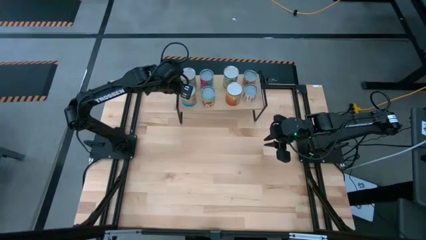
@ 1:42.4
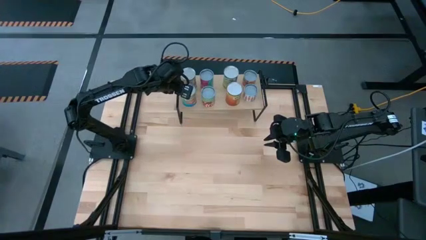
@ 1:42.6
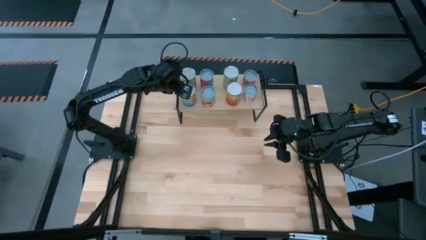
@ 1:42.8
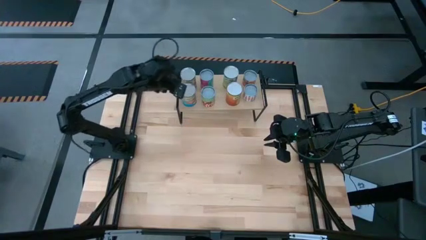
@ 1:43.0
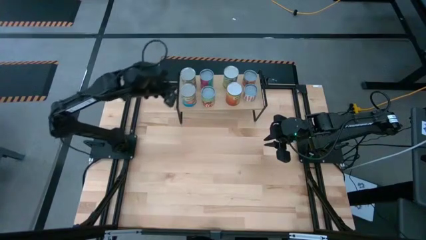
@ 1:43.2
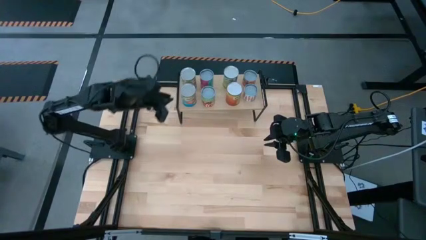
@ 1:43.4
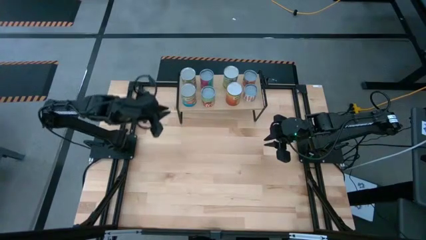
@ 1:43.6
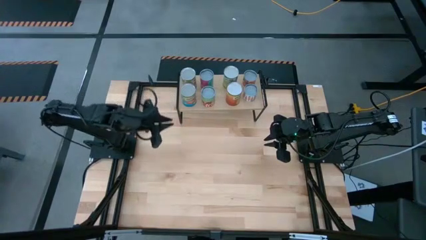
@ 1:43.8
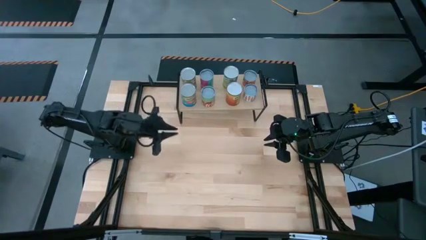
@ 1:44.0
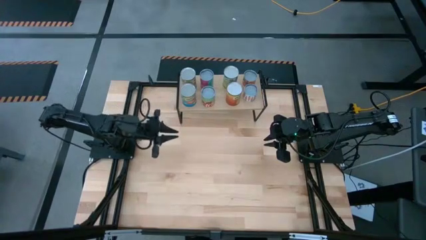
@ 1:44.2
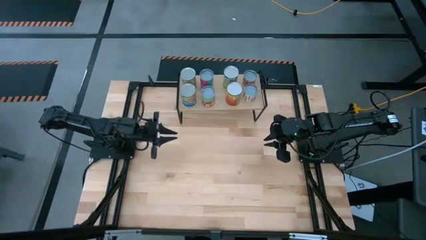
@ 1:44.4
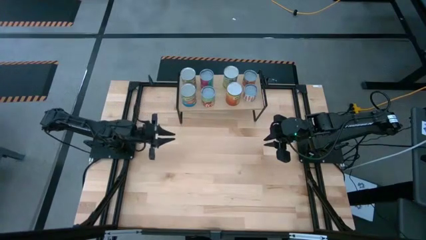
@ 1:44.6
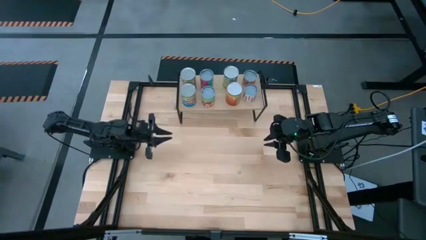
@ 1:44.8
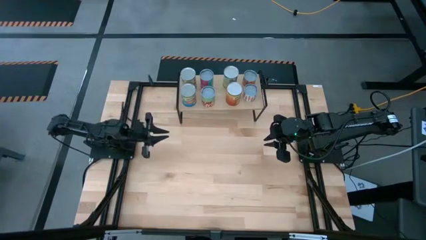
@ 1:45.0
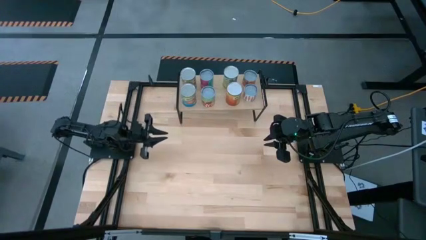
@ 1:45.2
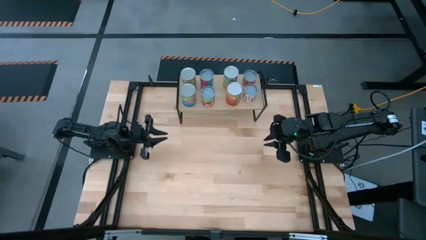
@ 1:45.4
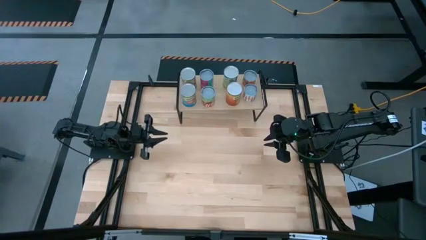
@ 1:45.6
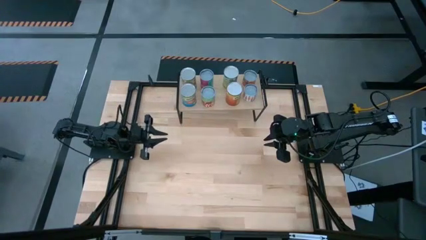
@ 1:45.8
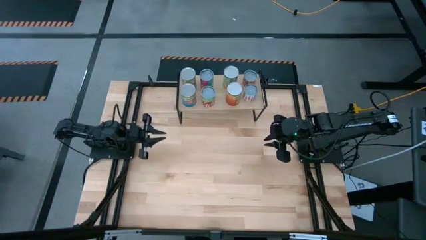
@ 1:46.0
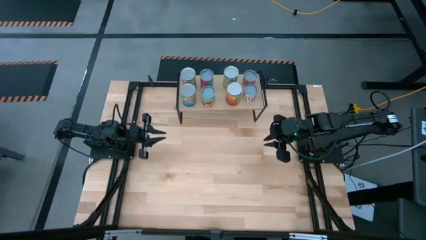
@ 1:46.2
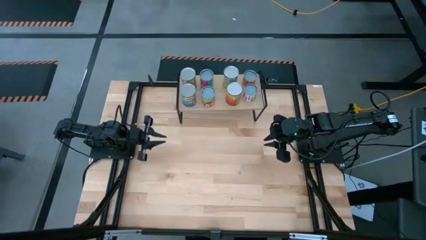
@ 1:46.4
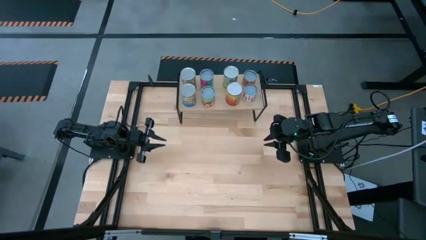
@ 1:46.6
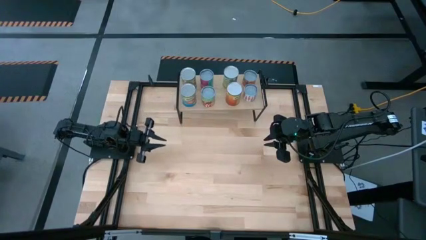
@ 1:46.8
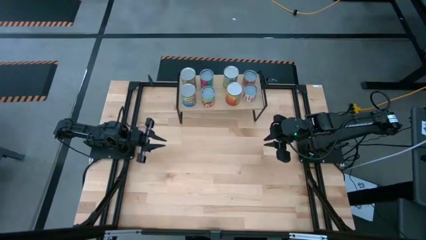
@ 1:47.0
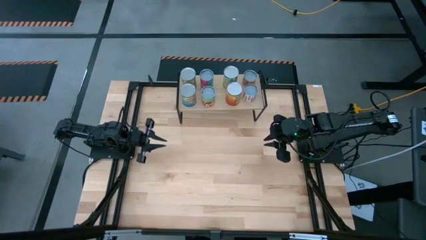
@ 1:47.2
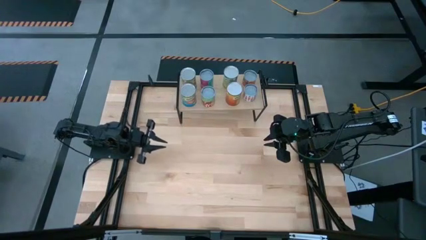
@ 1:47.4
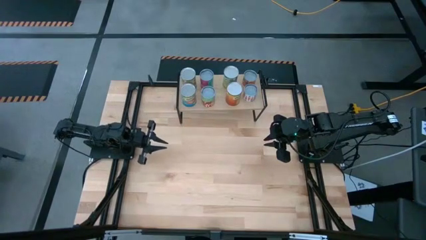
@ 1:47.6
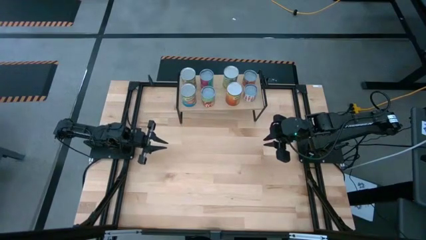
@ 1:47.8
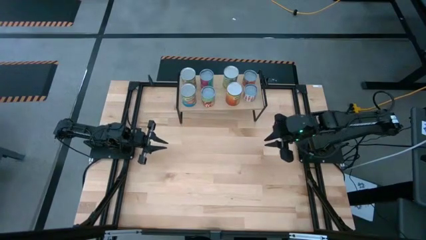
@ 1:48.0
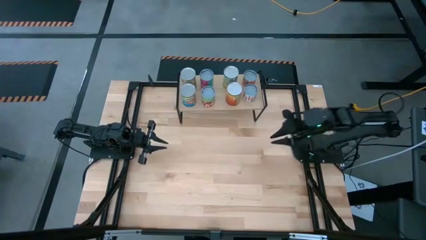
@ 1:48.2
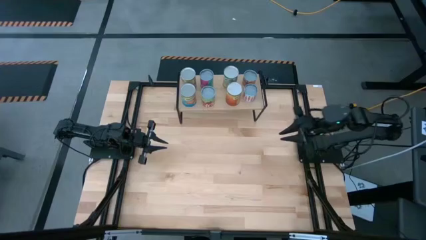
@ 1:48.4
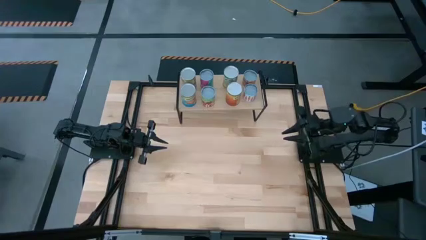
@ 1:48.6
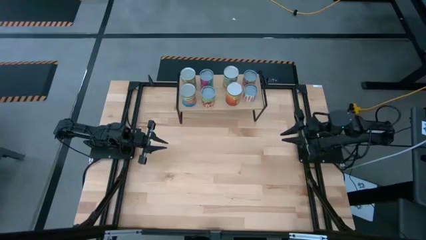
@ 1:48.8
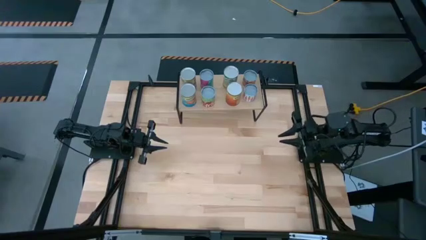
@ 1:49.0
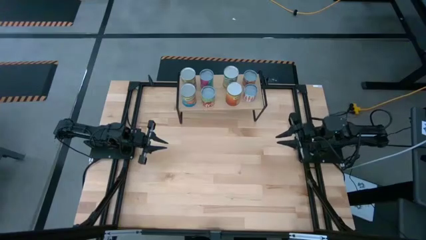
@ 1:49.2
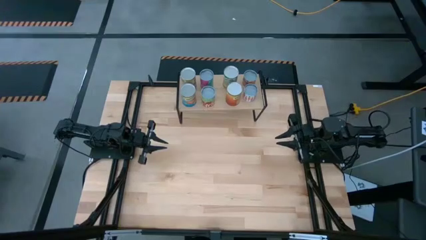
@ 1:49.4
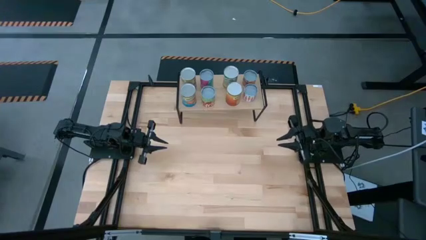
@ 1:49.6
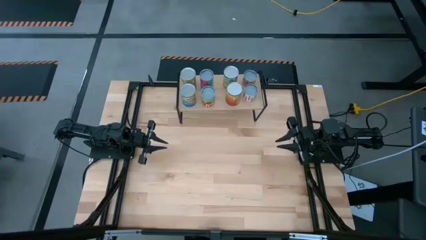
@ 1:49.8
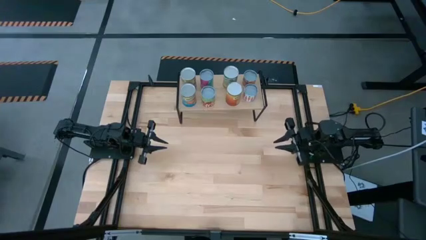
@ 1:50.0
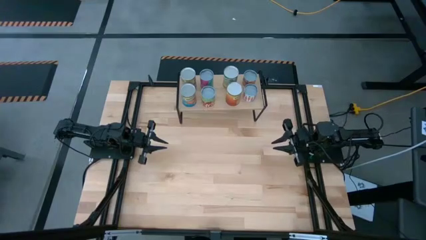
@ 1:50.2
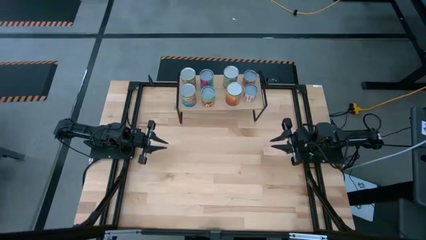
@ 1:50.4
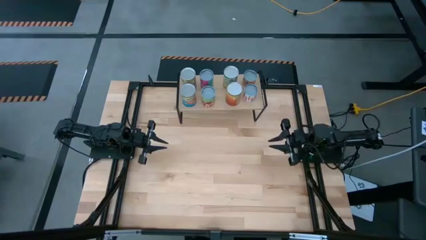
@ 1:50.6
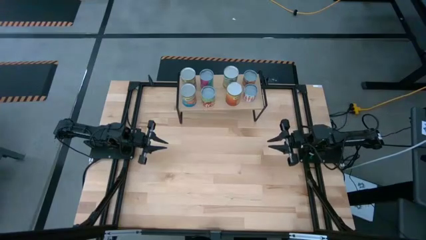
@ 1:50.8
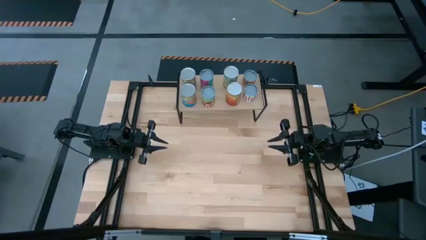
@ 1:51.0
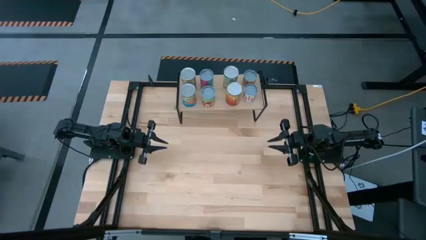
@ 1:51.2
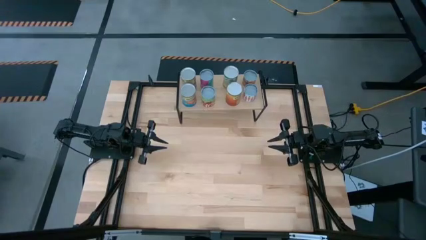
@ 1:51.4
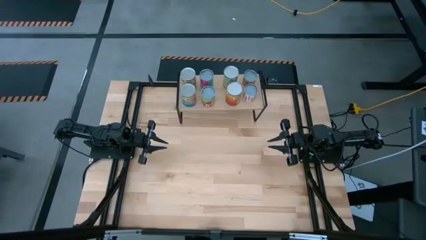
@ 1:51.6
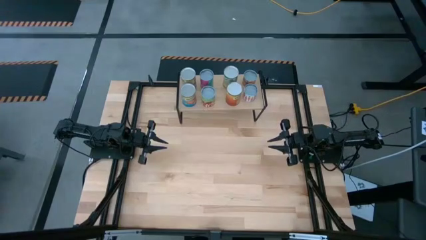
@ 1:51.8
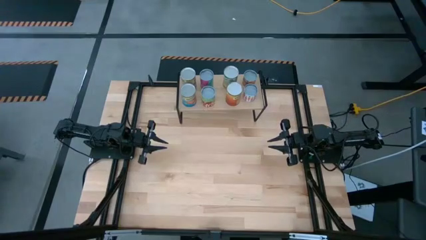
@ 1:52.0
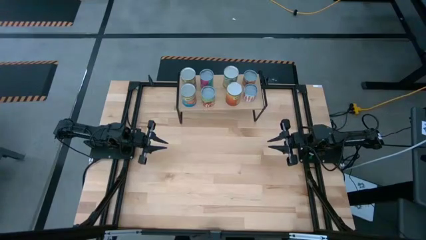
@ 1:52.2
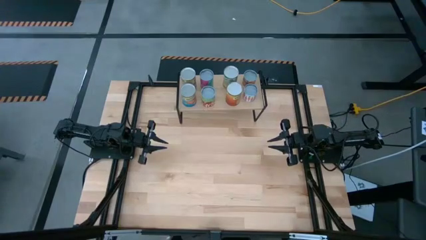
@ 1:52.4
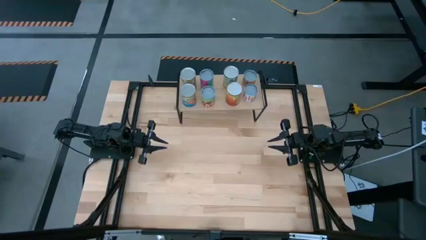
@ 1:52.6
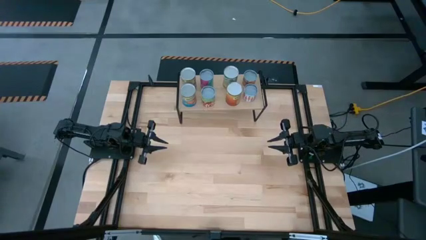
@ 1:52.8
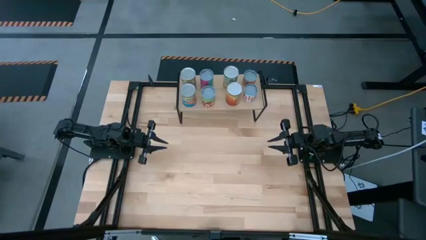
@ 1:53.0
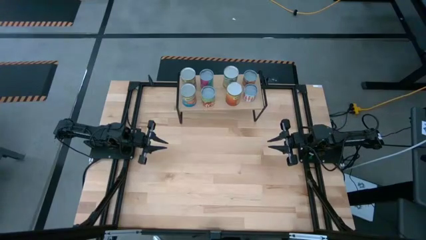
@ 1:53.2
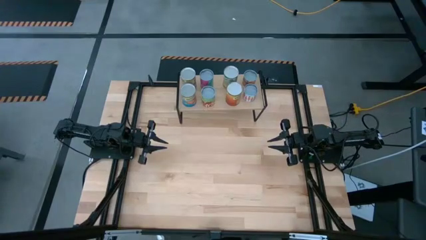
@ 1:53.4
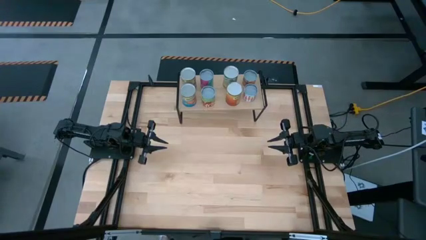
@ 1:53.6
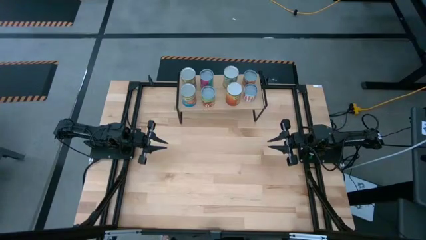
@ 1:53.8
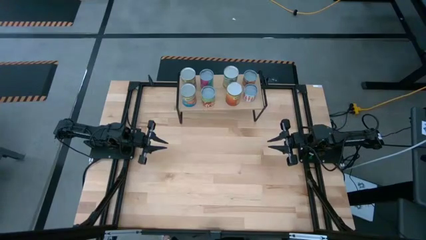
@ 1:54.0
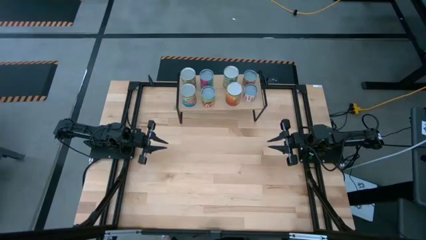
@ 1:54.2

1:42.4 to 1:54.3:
Task: Pick and place cans onto a shelf
Return to Home Position
